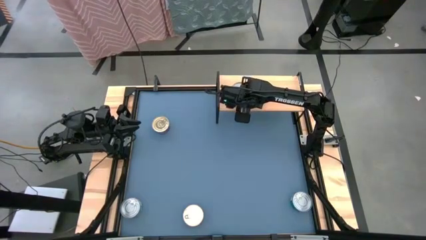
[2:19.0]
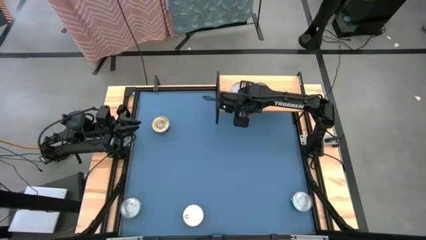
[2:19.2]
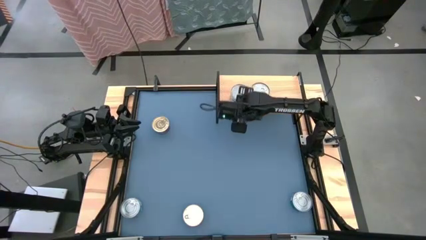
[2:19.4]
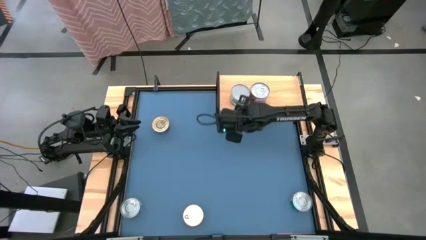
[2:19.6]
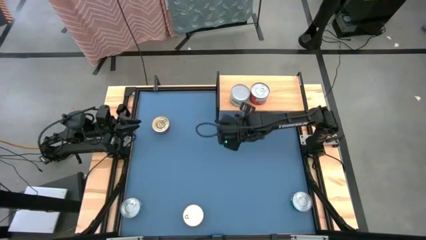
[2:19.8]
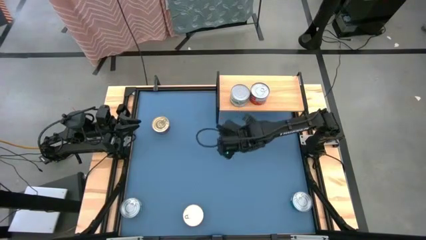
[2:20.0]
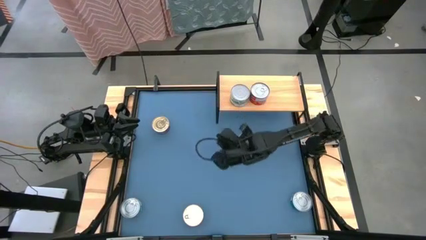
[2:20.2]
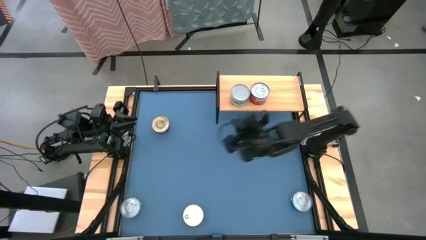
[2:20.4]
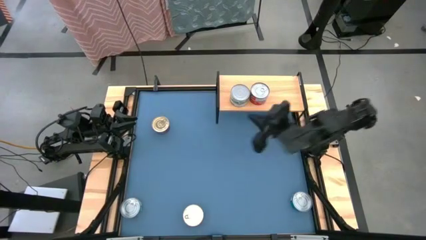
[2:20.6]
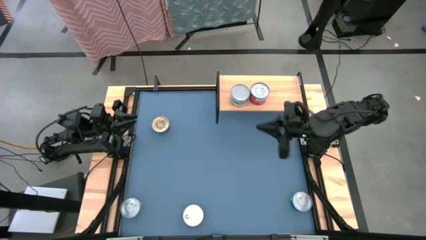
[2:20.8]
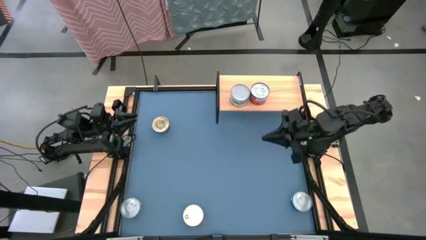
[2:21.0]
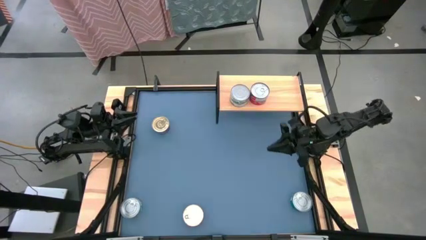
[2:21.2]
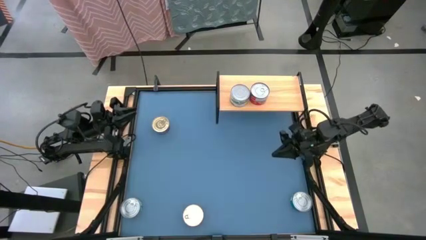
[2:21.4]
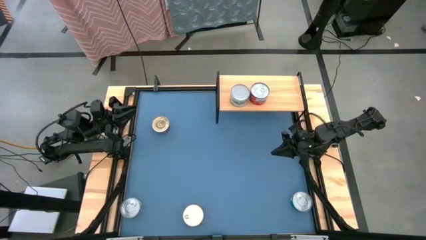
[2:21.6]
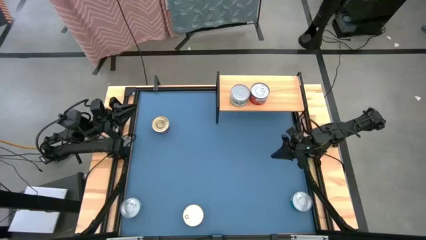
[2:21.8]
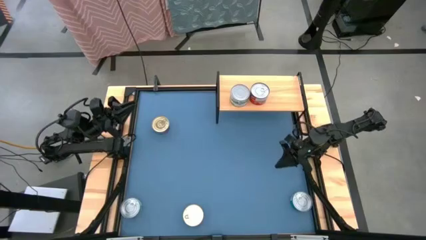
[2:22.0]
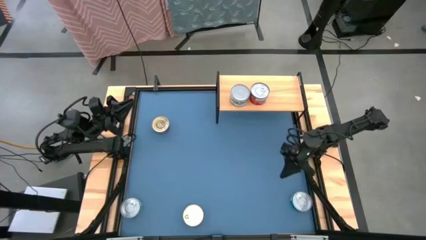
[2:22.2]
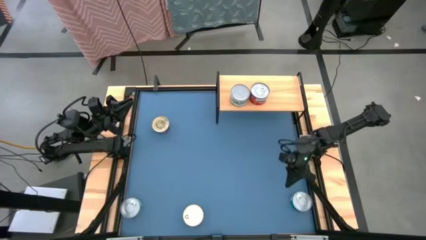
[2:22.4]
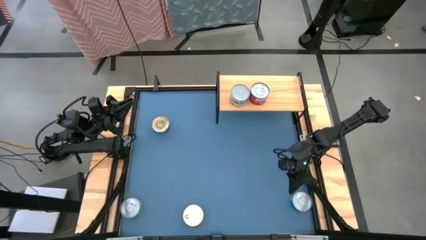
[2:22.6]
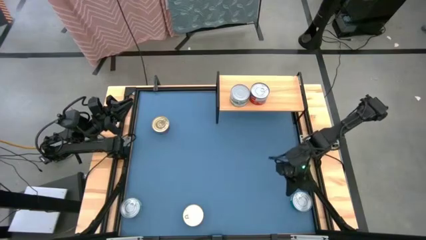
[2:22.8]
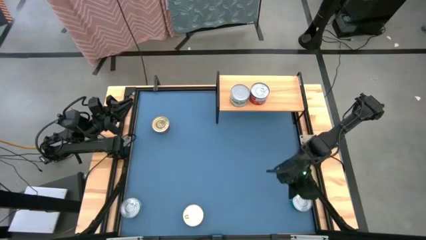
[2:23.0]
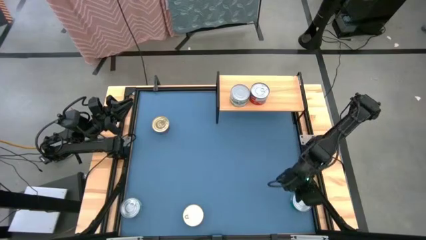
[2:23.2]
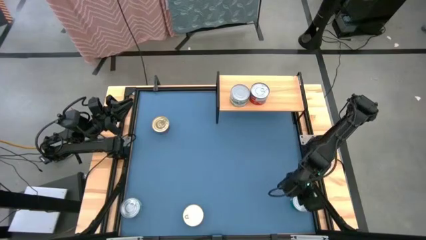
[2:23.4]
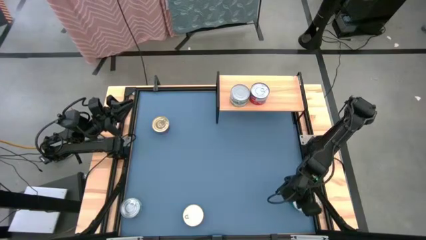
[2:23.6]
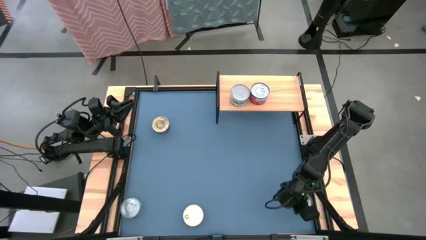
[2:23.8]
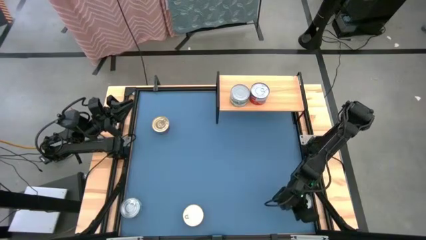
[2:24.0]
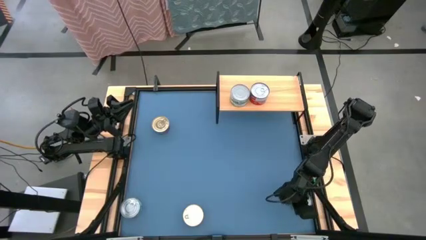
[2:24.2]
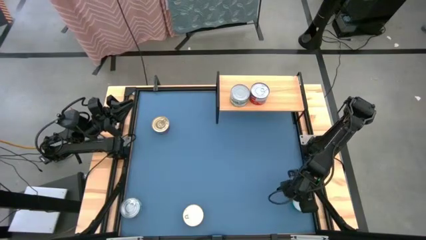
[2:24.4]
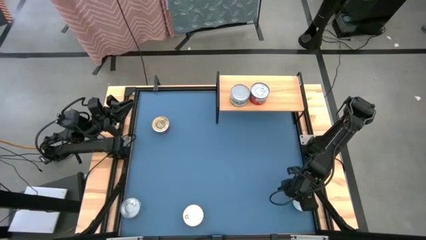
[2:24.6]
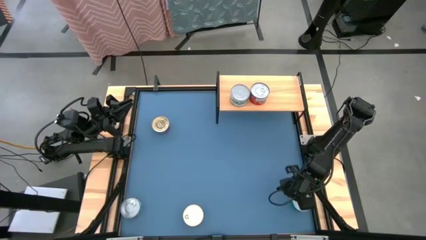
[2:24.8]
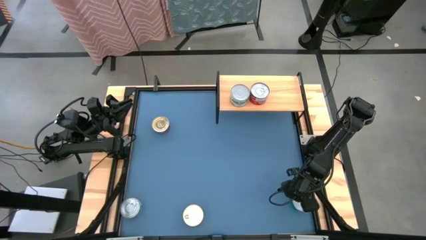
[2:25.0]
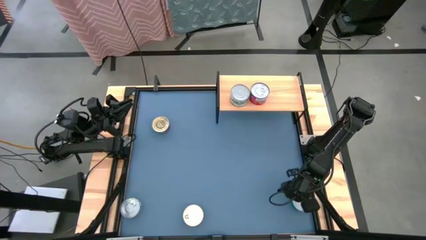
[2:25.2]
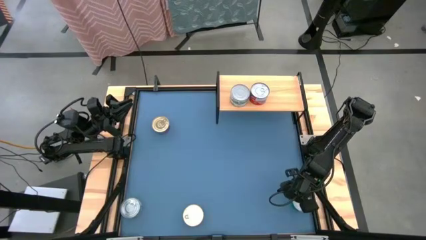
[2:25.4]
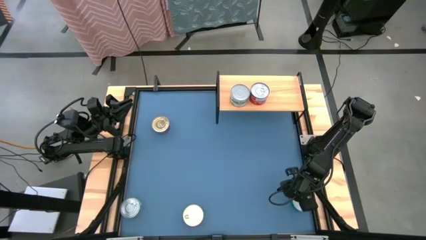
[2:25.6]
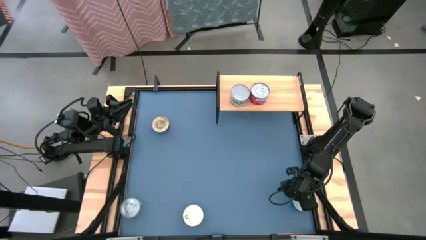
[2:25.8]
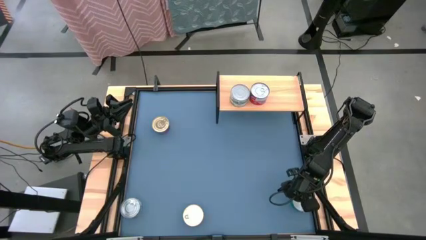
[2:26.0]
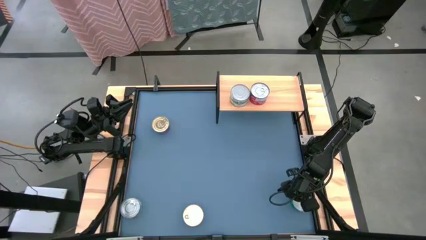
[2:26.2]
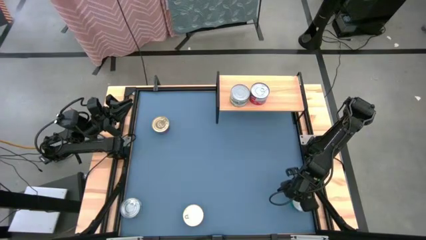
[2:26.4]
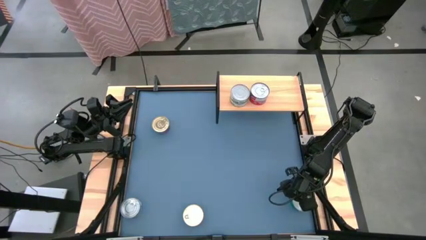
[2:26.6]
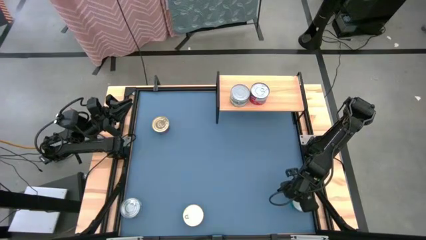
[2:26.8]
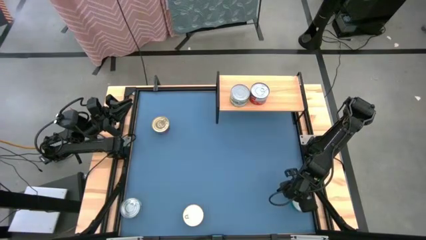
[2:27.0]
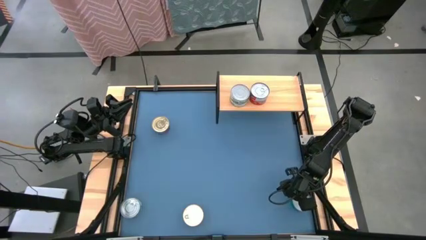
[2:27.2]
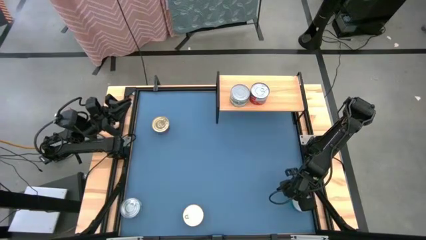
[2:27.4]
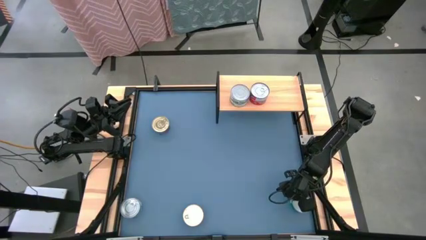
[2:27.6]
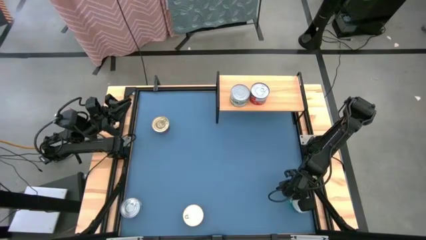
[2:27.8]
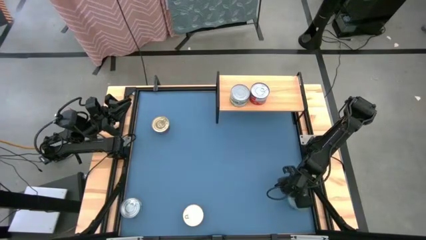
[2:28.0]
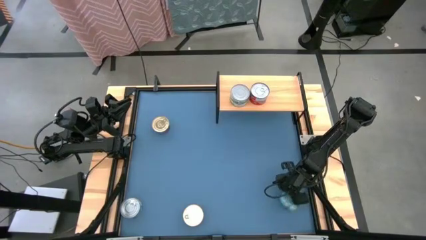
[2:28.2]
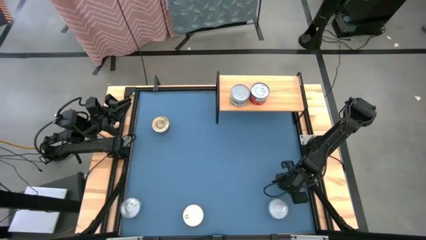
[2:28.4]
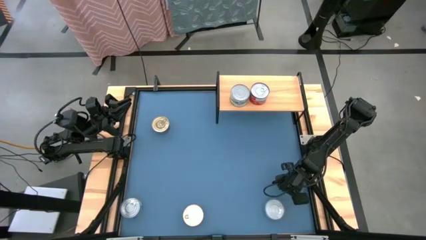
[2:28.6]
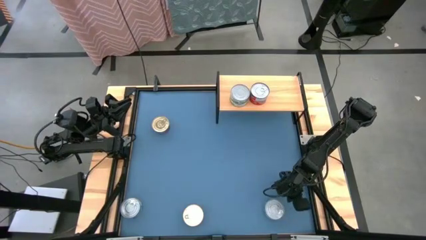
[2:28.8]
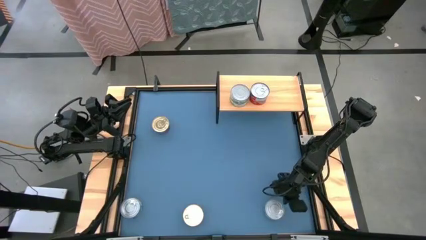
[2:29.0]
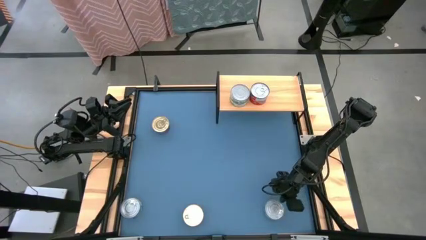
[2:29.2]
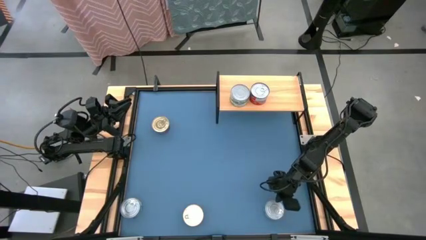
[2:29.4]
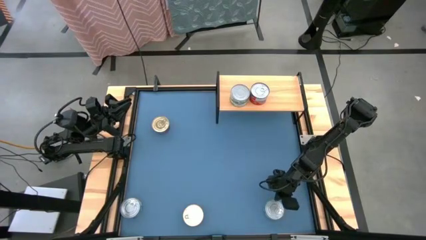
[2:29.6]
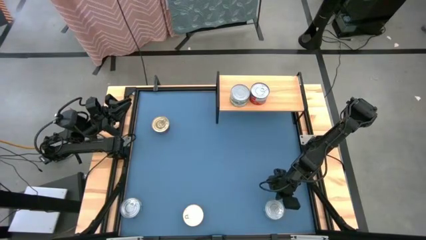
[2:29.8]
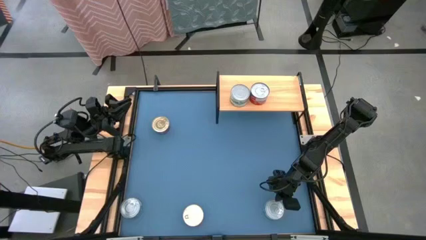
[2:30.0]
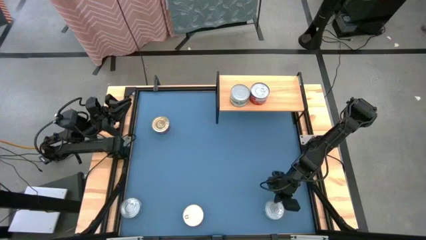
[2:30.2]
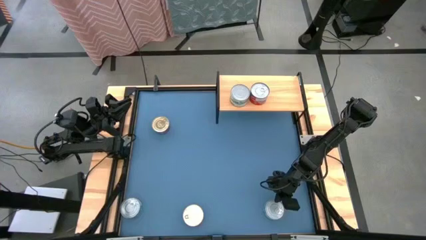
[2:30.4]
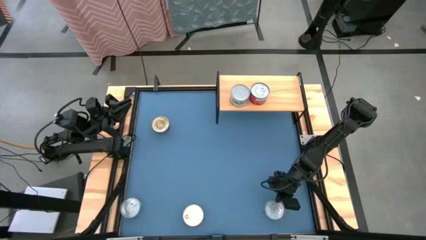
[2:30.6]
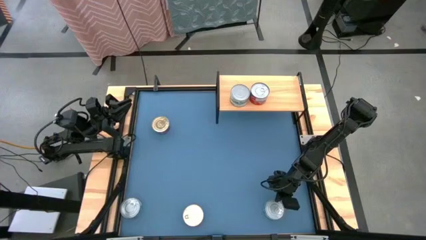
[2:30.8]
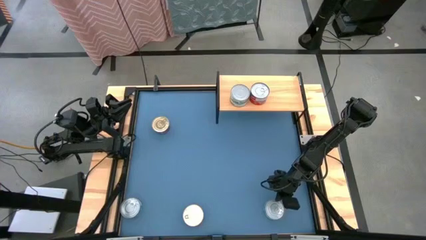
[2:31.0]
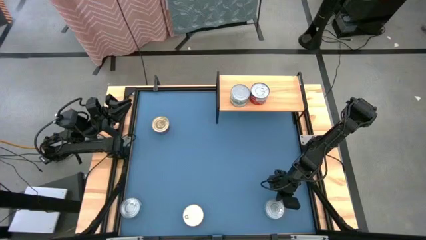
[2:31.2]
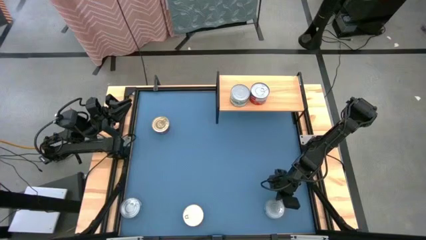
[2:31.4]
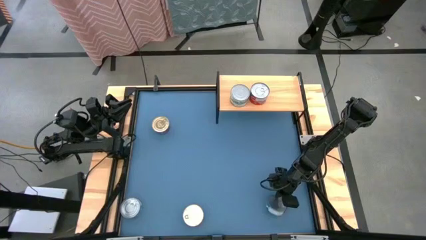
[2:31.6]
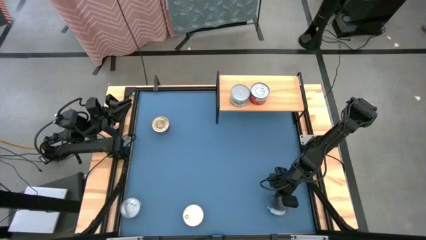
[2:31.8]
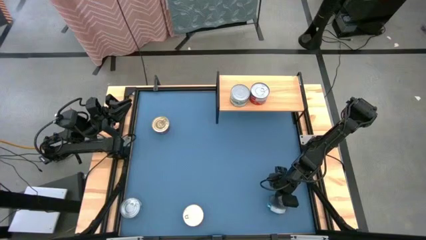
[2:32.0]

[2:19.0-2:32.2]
Task: Stack canned seafood by type on shelf
Put the right green-blue tuna can on the shelf

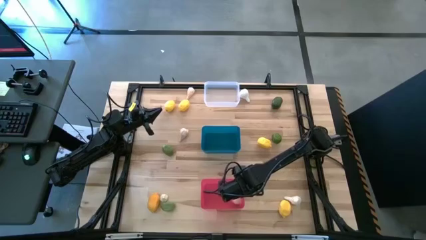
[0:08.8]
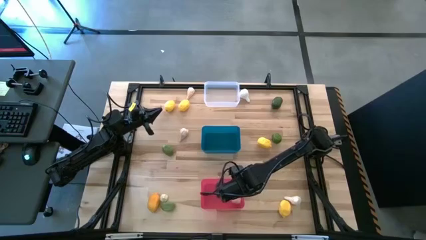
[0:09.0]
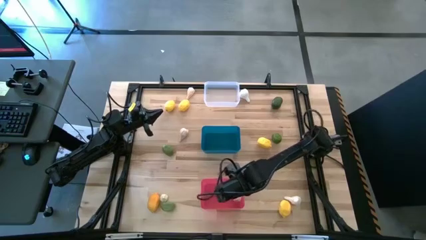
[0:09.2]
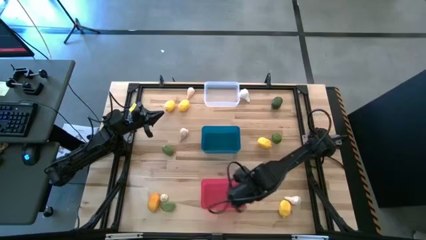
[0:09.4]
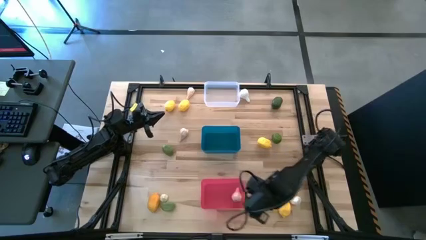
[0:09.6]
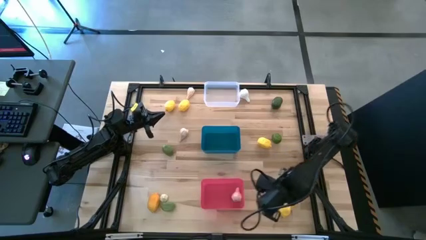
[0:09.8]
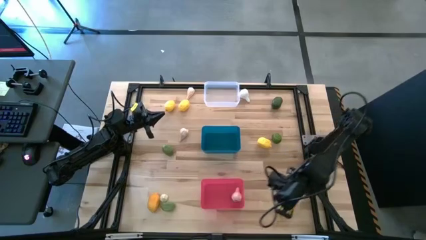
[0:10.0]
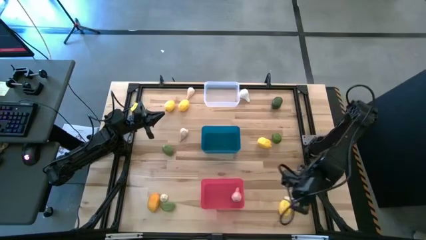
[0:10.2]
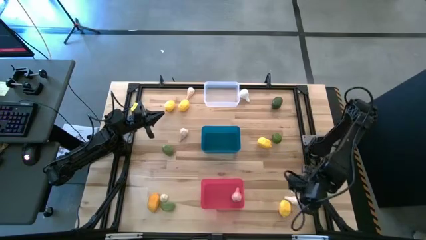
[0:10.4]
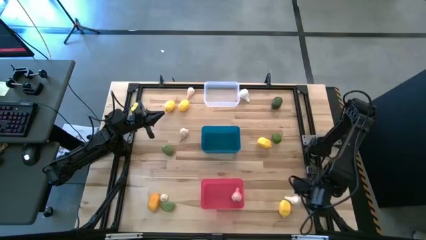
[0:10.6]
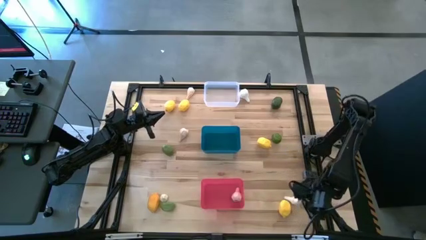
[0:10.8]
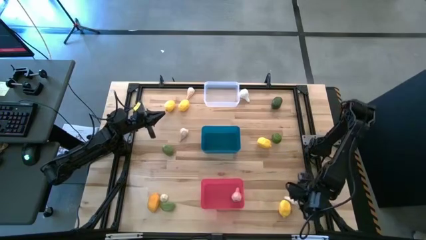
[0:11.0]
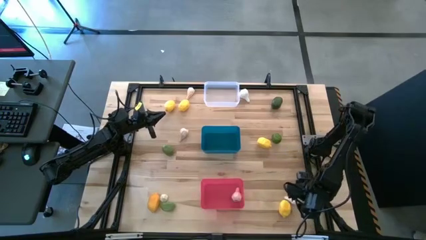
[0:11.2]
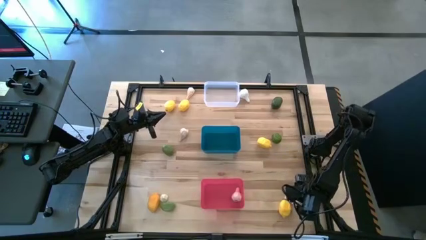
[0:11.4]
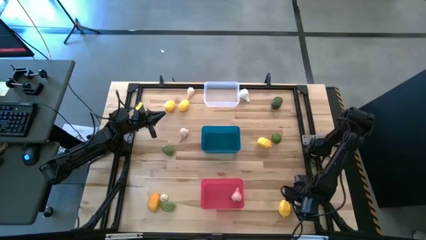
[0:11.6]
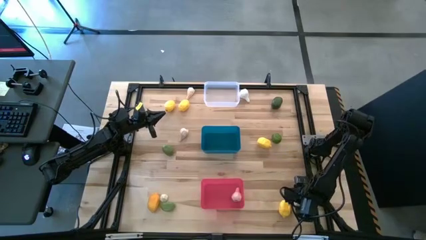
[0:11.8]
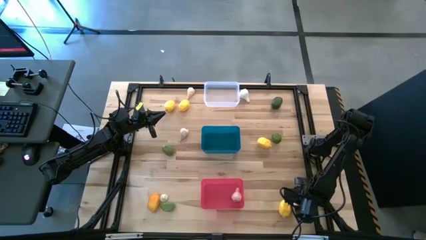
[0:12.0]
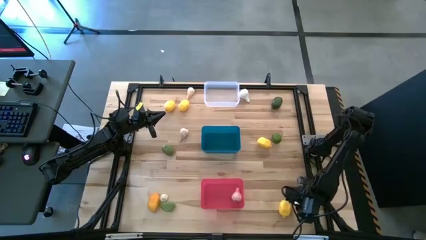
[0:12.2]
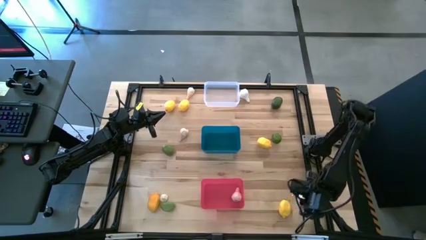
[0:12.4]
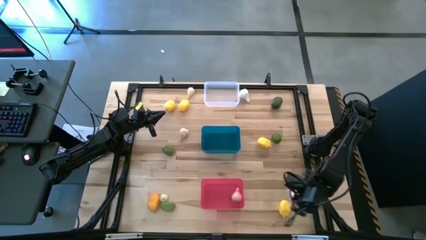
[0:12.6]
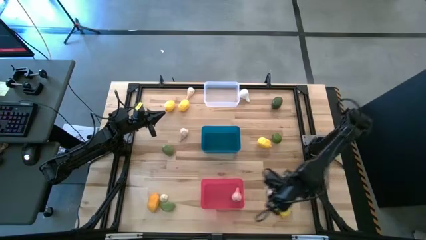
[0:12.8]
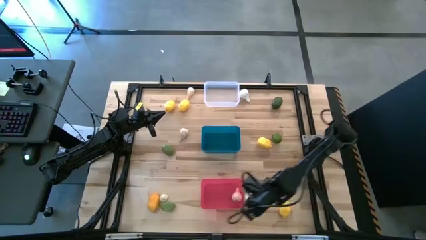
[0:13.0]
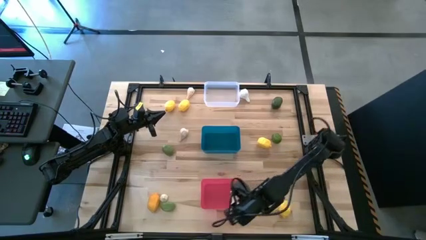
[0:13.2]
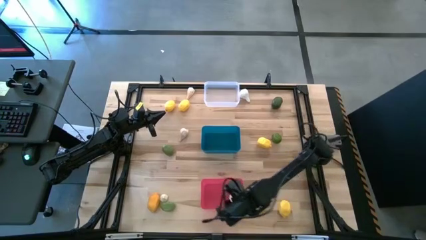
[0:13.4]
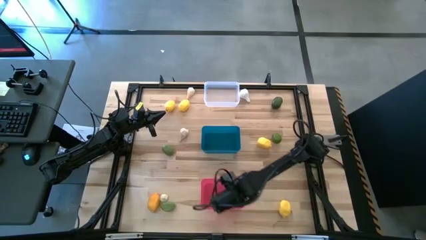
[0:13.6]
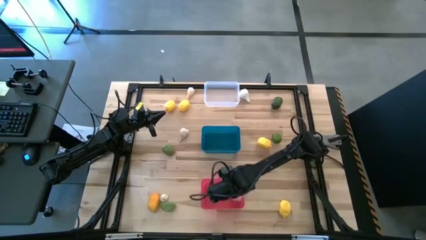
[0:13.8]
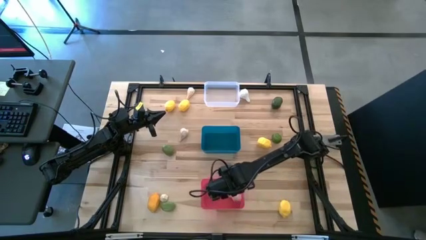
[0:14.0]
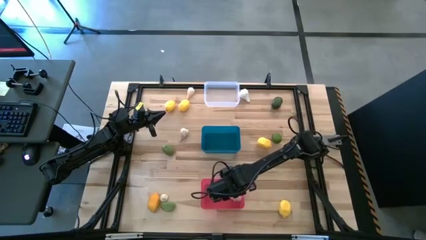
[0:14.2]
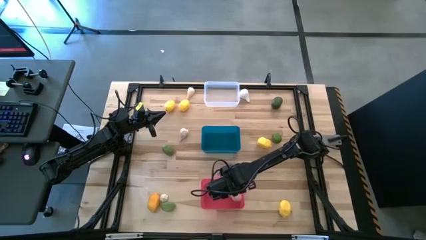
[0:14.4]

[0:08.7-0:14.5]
Task: Sort produce into baskets
Put the bottom right white garlic into the pink bin
